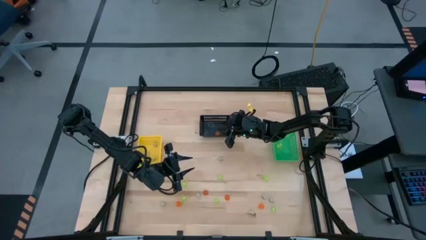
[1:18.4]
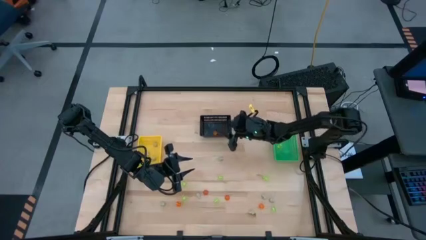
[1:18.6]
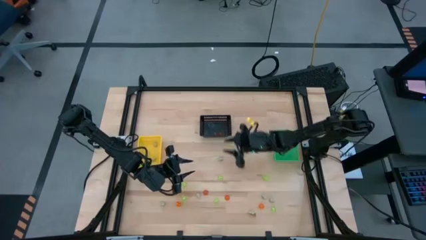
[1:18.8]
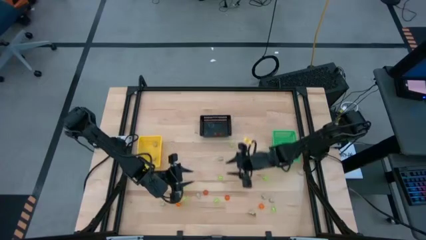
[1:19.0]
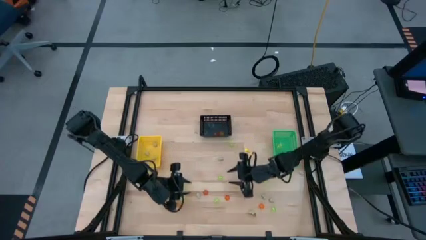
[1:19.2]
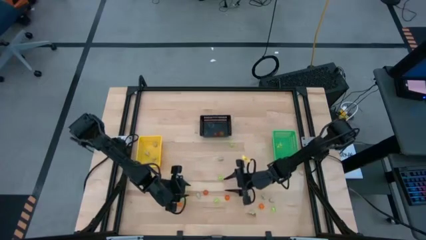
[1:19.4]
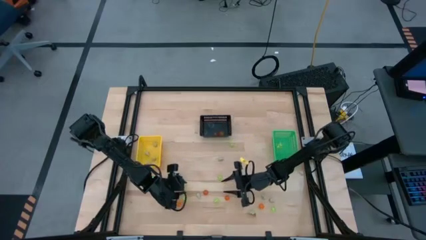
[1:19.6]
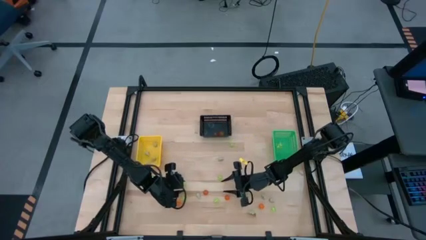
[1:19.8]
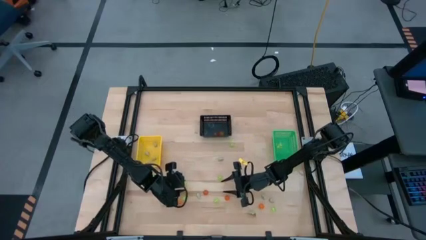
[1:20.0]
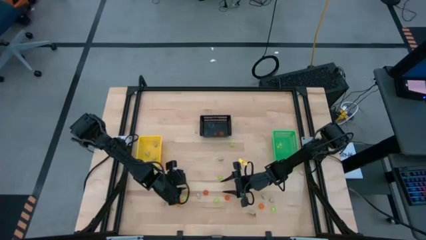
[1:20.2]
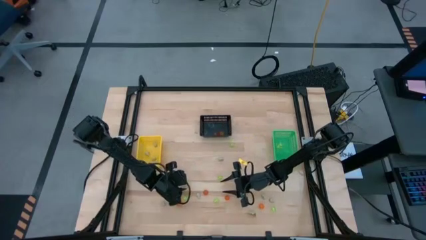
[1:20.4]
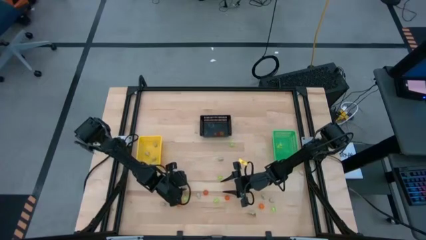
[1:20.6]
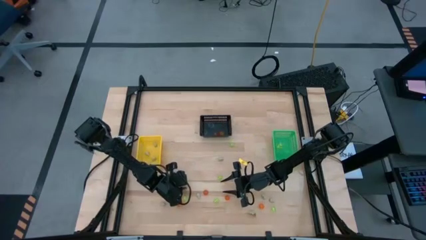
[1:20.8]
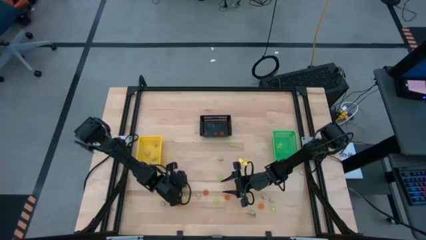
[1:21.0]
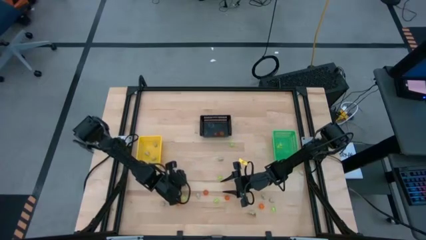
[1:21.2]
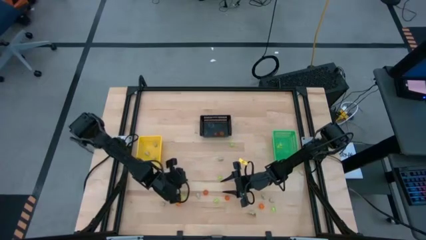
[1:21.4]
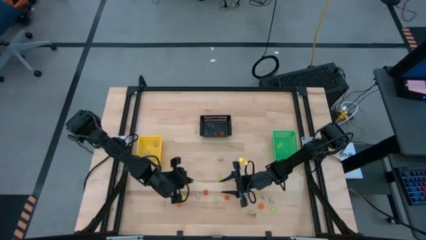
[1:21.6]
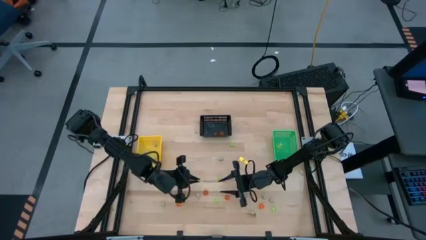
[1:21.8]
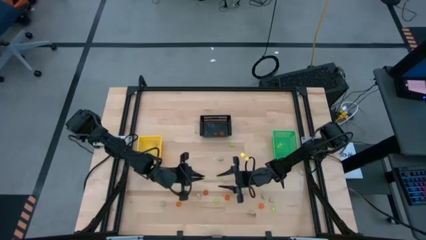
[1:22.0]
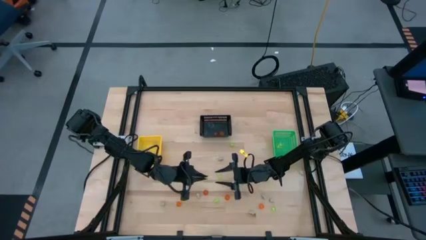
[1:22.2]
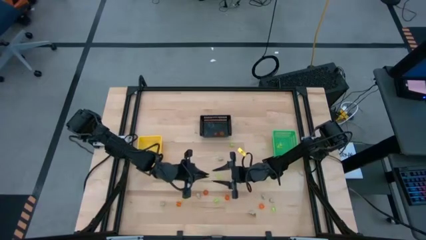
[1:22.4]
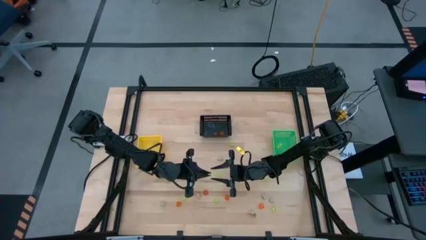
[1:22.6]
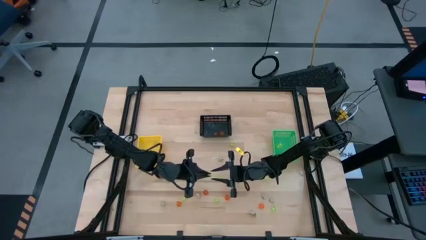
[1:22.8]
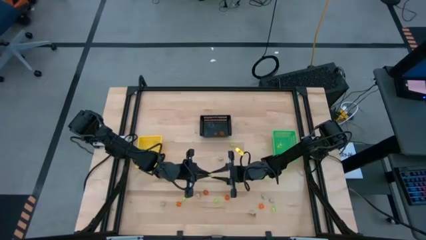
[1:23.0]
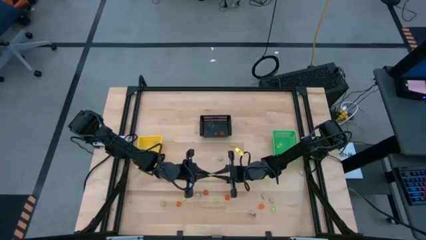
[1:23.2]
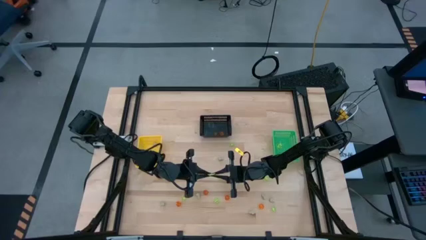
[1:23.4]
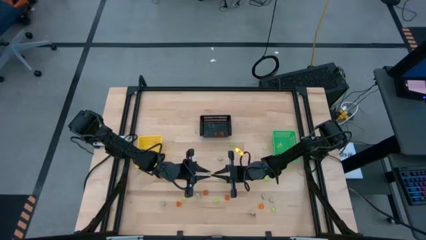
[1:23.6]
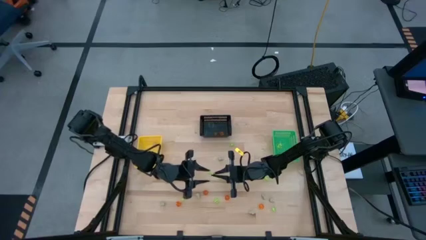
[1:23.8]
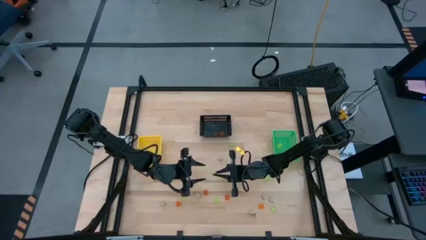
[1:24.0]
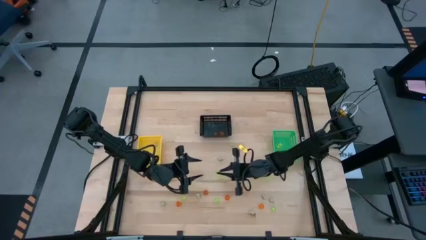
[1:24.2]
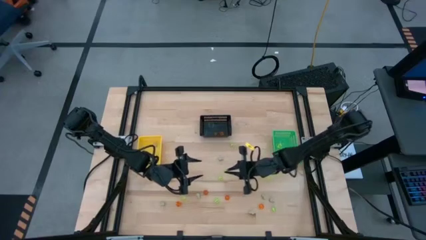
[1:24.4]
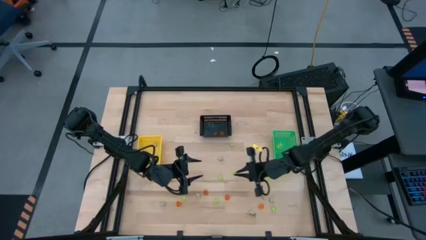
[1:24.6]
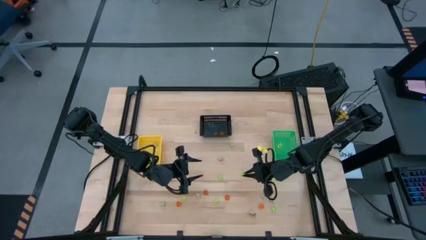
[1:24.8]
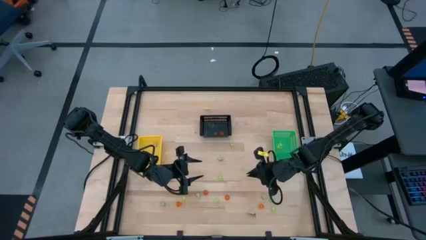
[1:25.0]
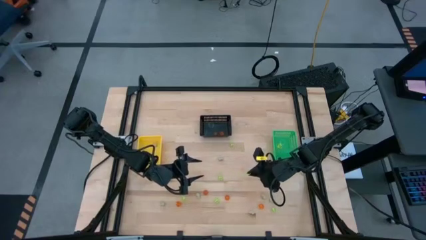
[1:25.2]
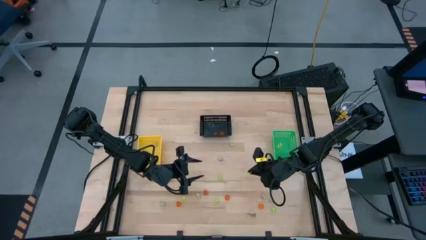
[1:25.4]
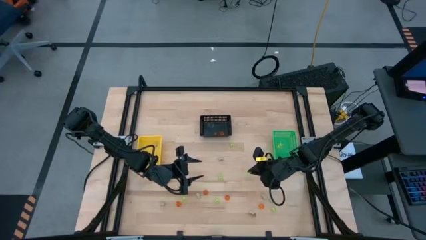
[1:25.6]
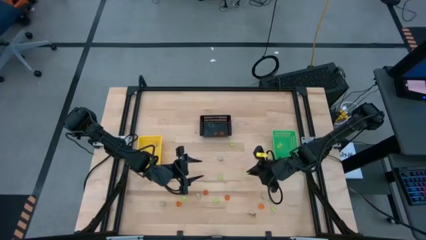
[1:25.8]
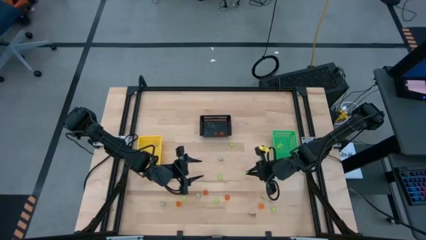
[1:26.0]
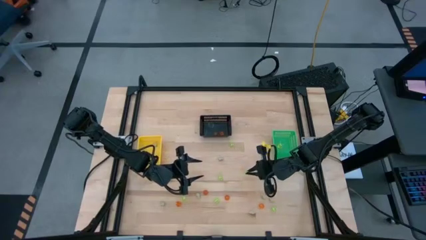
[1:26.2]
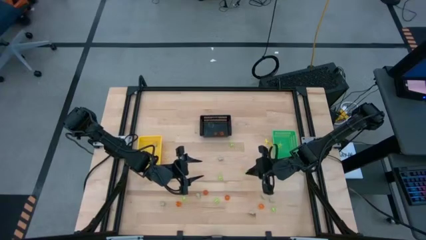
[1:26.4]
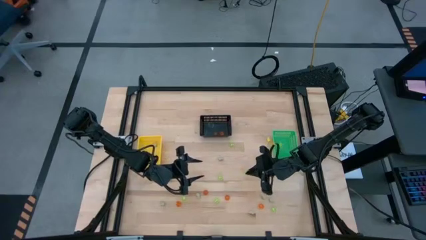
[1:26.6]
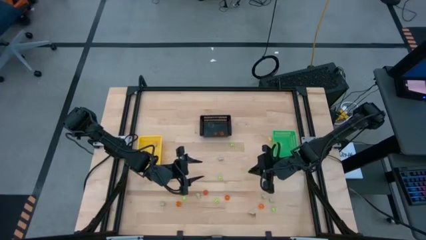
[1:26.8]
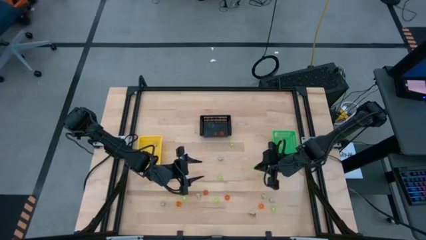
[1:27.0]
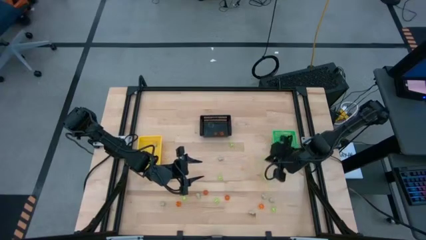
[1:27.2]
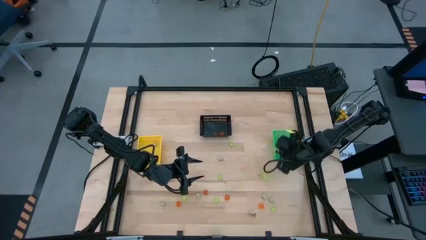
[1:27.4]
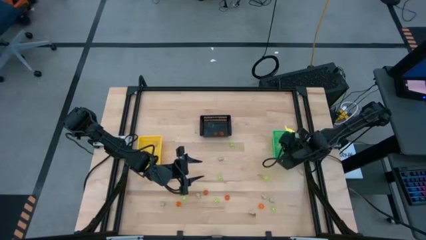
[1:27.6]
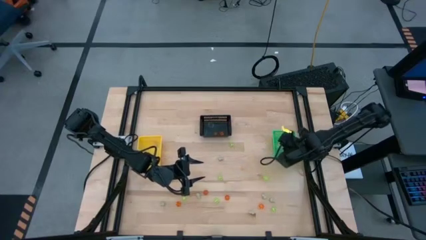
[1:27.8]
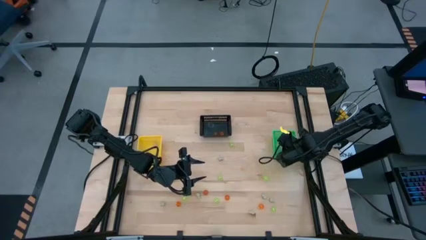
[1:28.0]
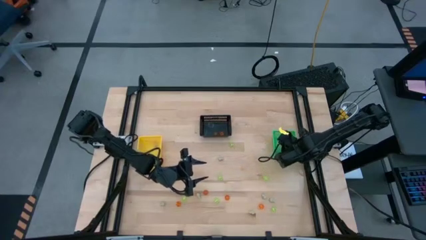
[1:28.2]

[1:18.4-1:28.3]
Task: Sort Halloween decoration
Put the green spider toy into the green bin

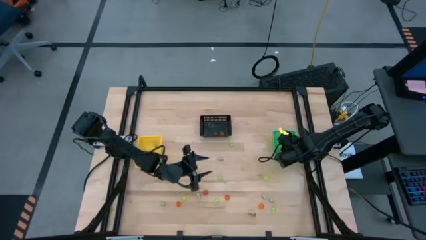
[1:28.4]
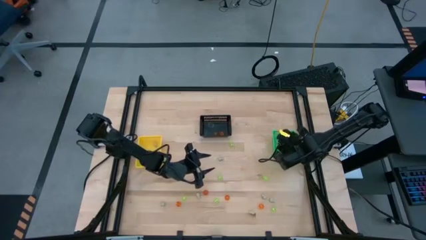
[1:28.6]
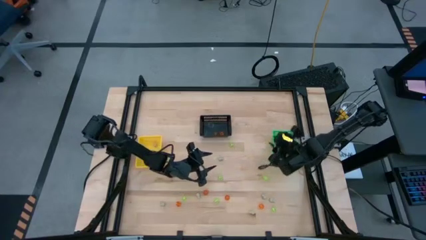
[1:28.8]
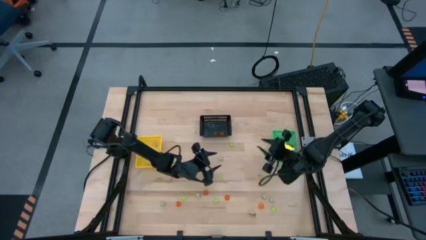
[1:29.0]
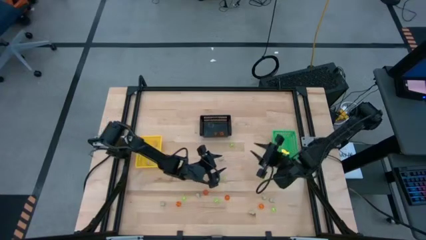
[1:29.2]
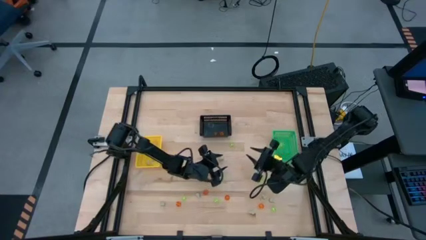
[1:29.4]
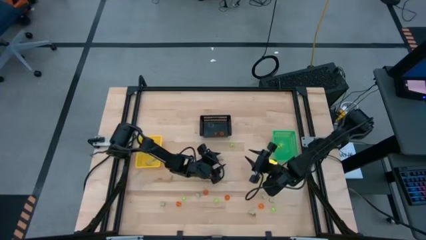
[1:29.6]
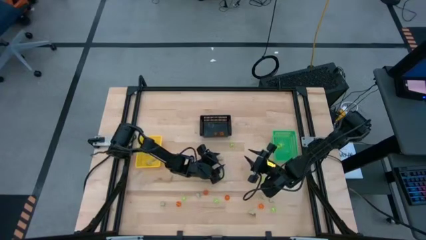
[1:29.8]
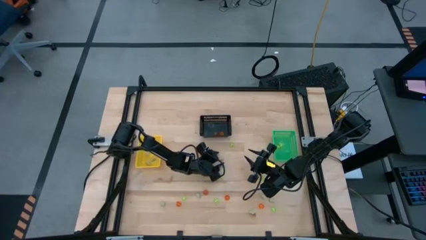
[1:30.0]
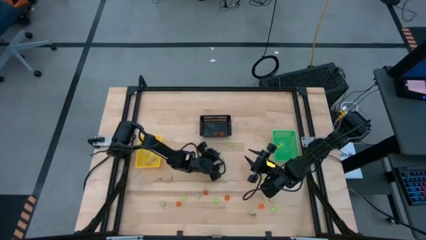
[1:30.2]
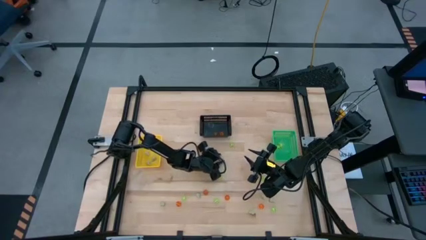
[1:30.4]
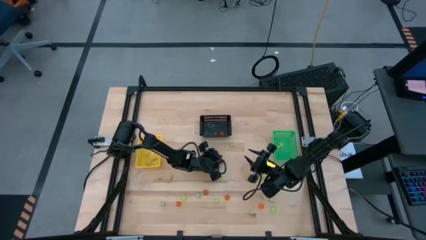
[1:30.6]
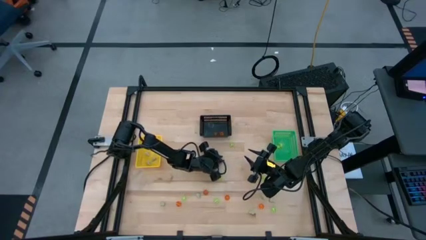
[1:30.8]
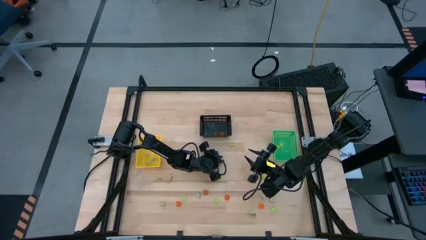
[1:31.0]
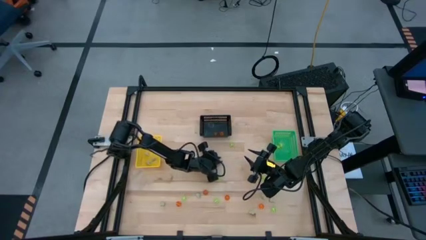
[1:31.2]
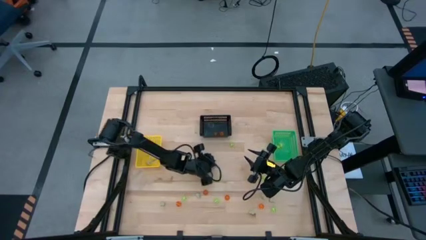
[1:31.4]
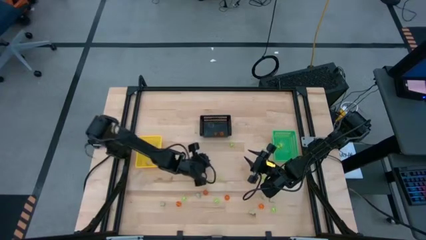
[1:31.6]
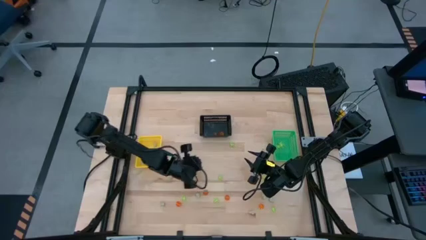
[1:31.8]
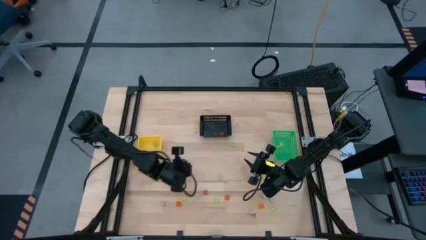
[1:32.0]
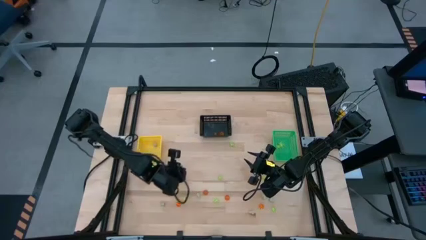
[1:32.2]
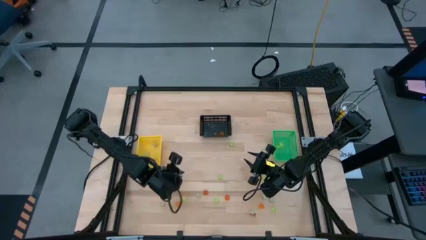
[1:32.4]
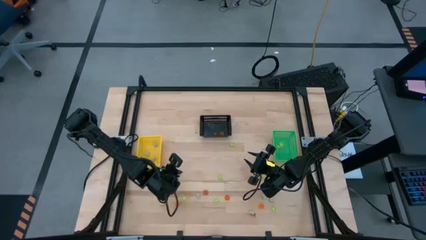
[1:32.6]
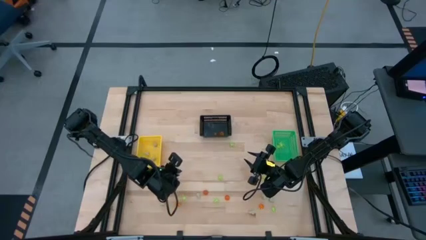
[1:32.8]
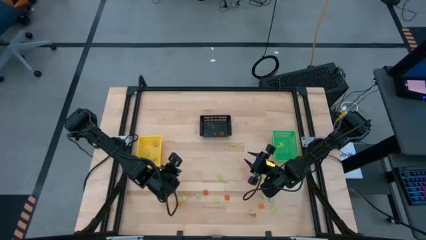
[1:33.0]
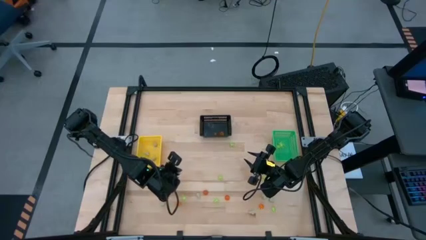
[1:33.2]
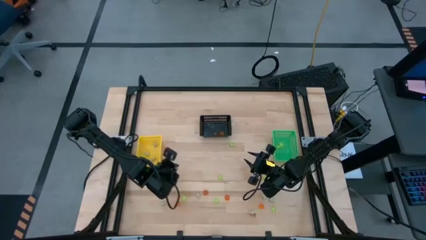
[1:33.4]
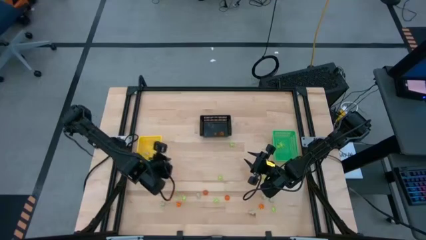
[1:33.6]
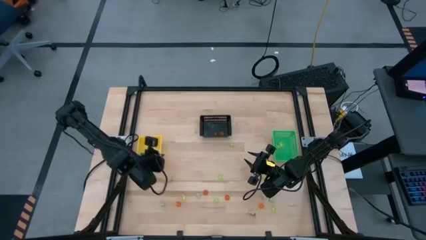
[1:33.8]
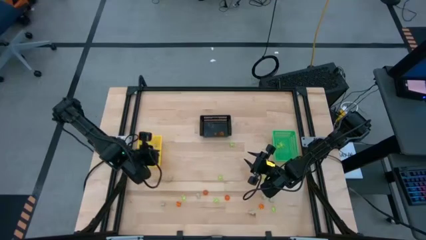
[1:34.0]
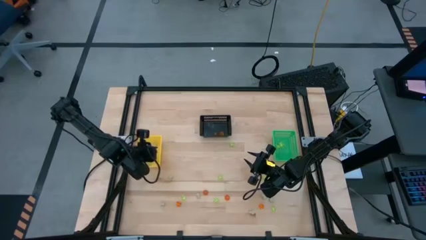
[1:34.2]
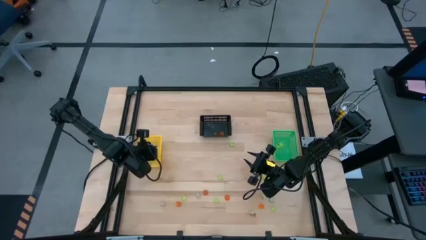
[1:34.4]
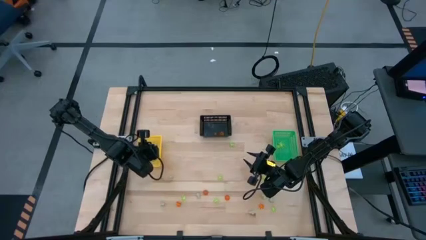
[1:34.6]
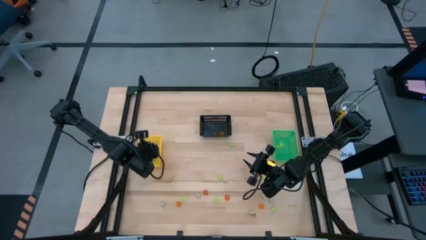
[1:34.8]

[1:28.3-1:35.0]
Put the white skull toy into the yellow bin
